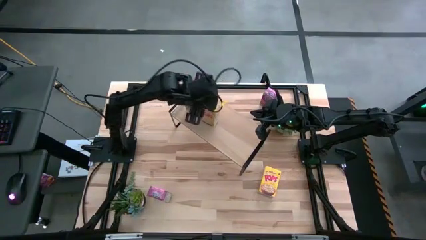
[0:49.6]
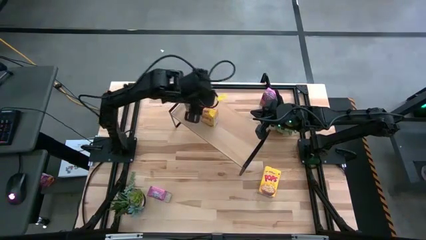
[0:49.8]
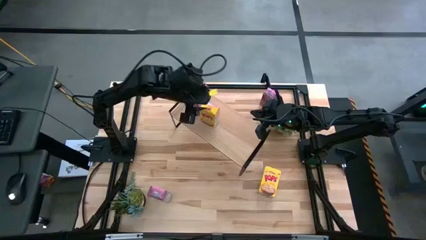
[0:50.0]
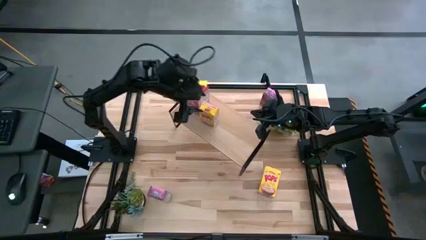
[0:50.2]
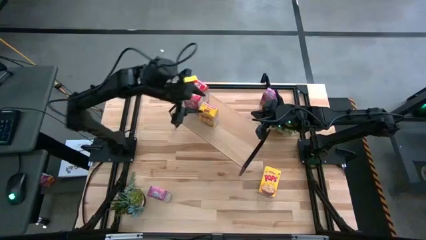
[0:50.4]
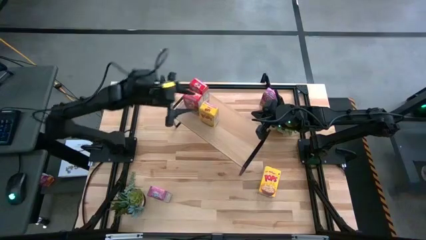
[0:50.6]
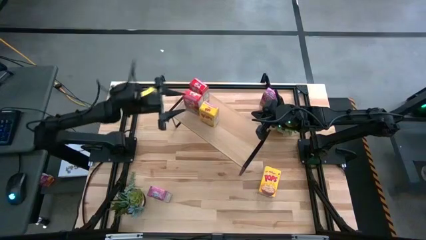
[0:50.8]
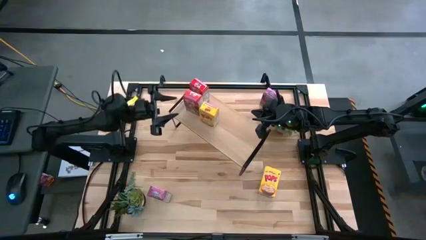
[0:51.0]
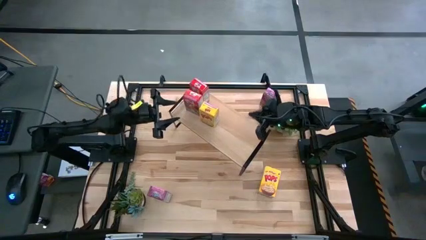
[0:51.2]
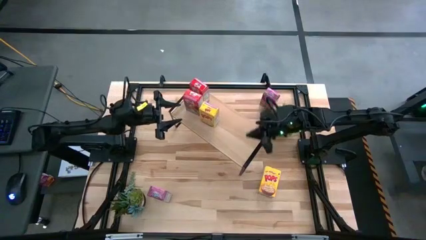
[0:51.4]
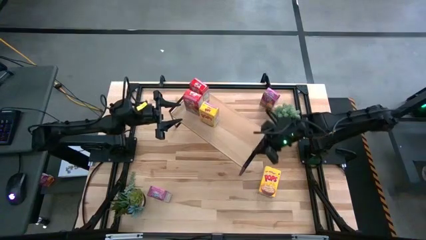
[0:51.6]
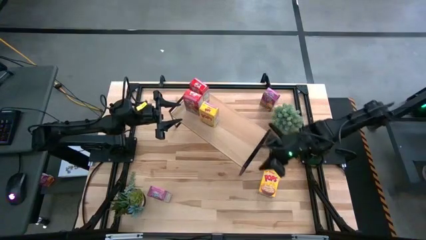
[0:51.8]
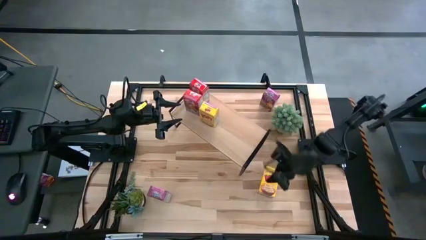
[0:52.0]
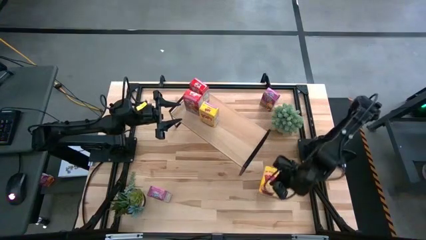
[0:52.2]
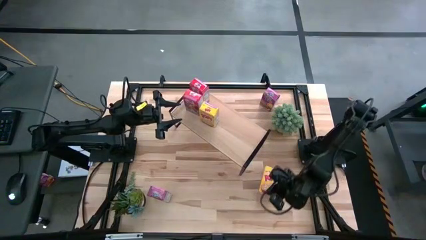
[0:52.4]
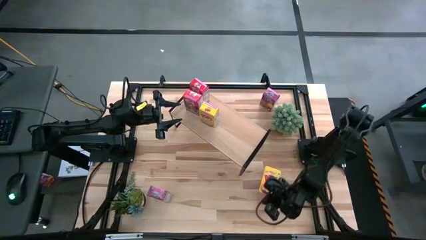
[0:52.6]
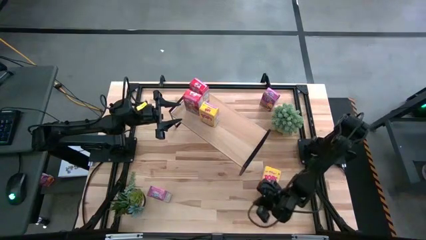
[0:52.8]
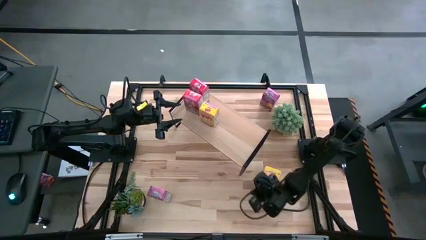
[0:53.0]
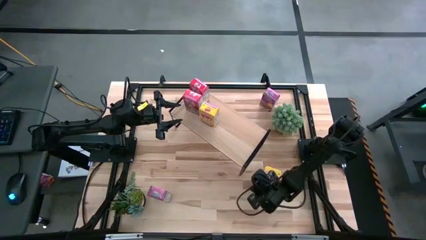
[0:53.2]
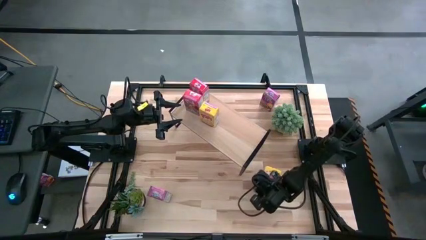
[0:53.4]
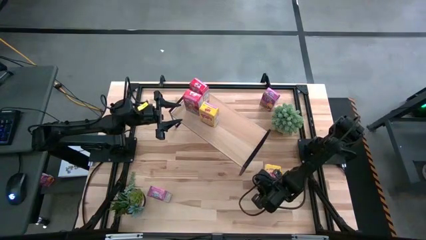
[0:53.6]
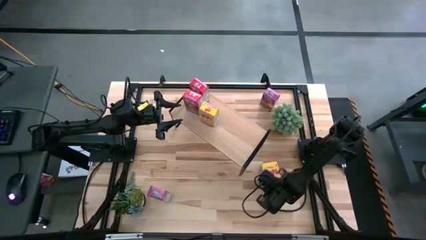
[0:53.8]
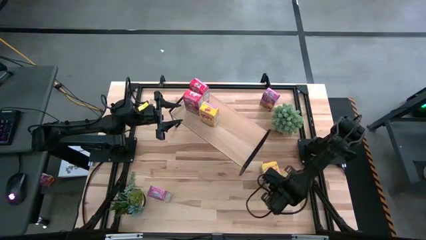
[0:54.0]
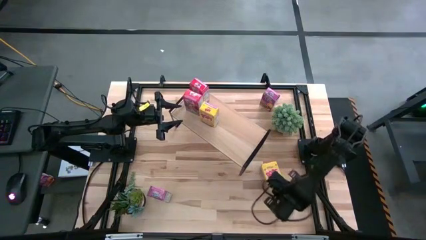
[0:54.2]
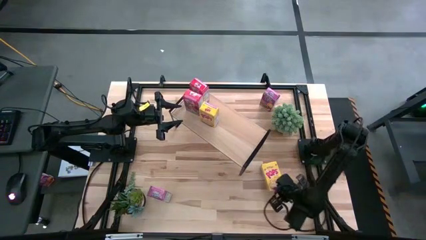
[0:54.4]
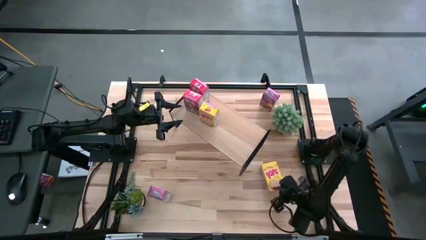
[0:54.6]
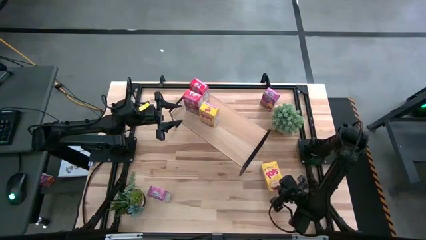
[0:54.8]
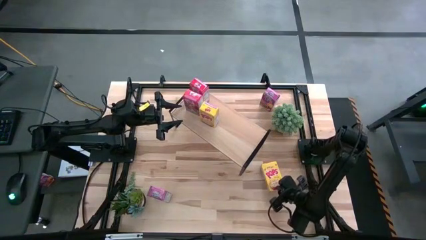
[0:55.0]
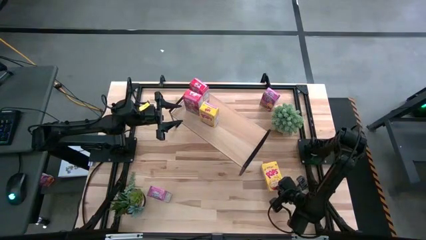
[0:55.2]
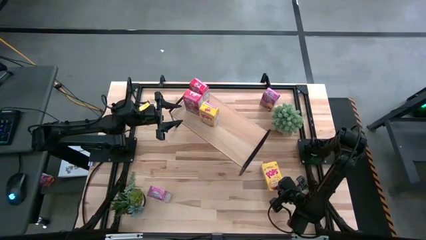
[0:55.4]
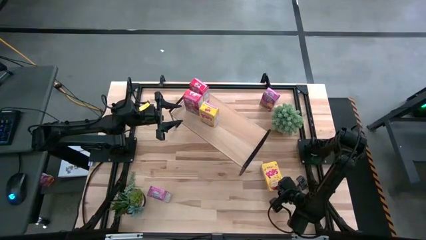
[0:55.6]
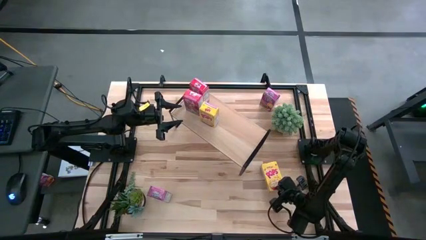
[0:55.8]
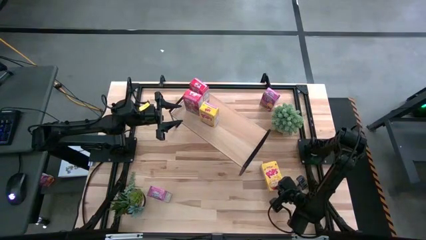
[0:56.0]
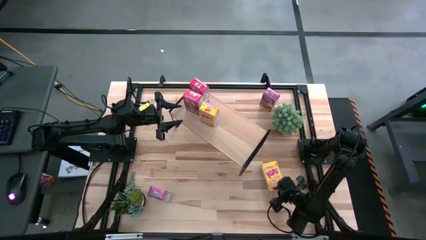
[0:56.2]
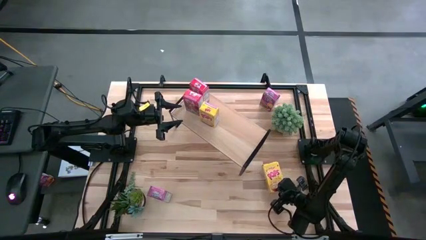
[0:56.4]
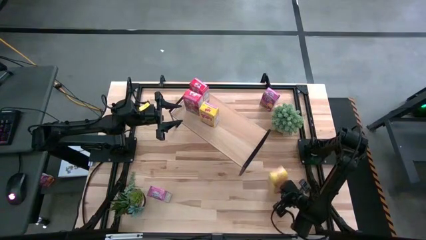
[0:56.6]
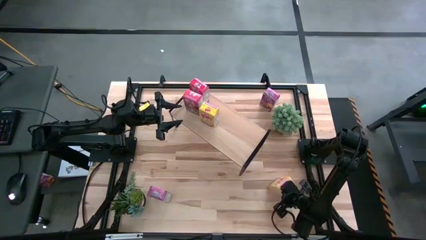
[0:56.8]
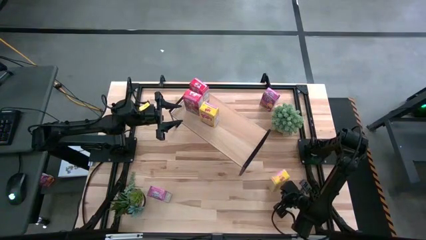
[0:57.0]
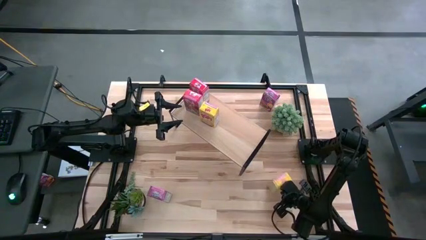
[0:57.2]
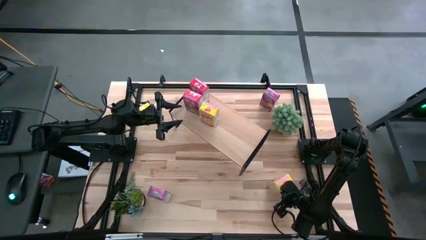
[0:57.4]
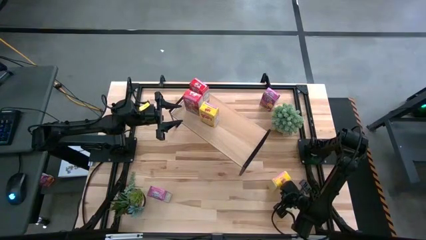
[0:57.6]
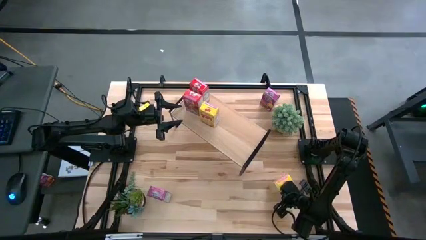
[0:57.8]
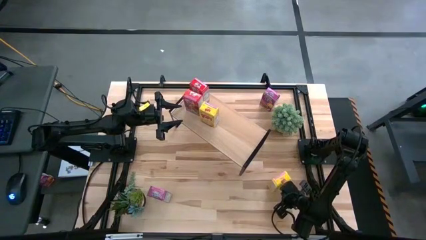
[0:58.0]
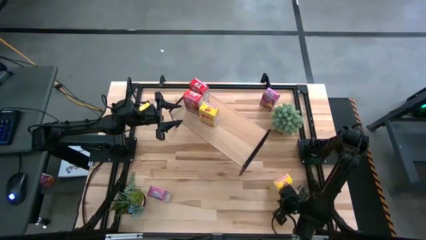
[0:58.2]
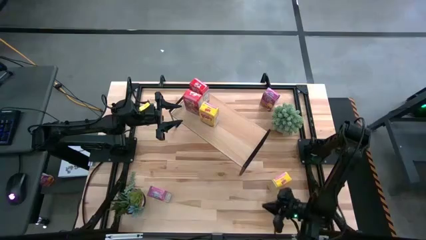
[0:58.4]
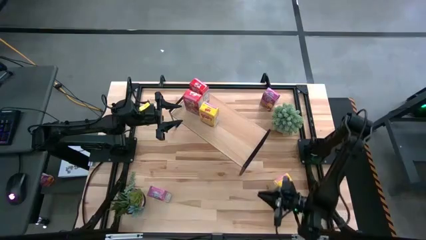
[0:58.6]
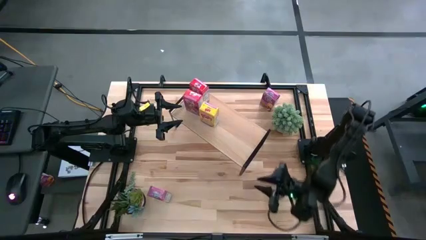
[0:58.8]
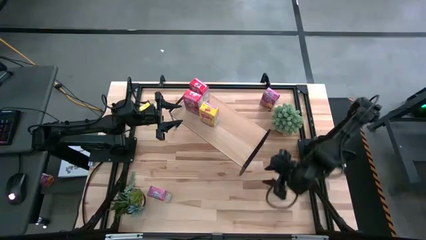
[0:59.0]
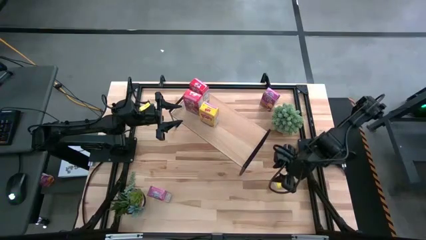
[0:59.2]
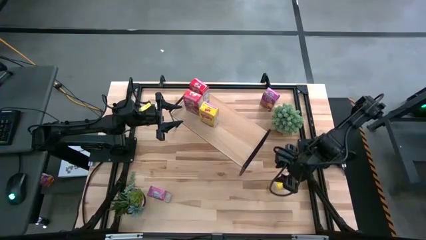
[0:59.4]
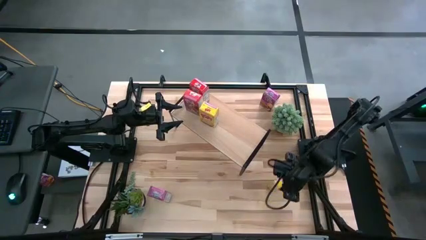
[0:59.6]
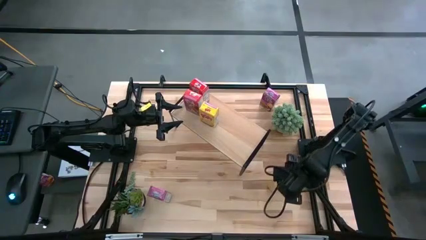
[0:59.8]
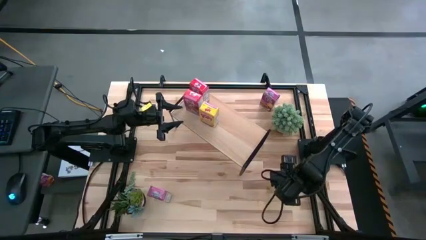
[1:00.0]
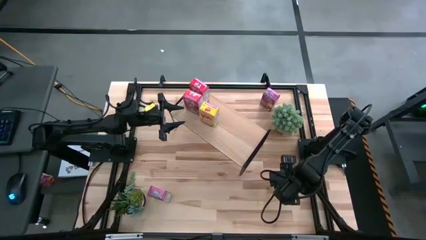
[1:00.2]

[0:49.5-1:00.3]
Task: Stack cereal on shelf
Put the yellow cereal box on the shelf
